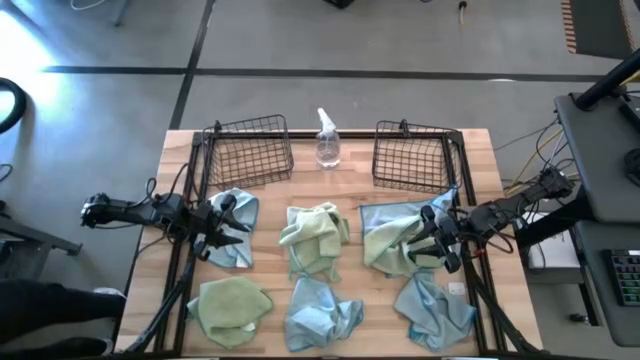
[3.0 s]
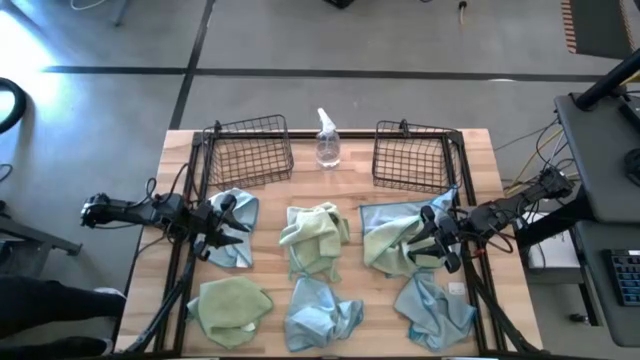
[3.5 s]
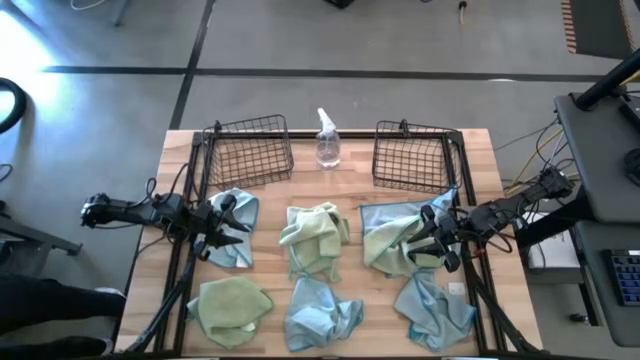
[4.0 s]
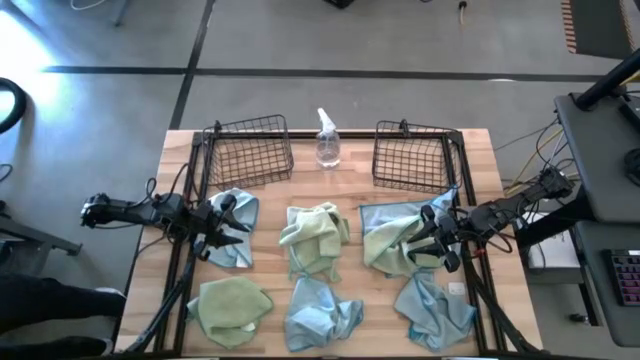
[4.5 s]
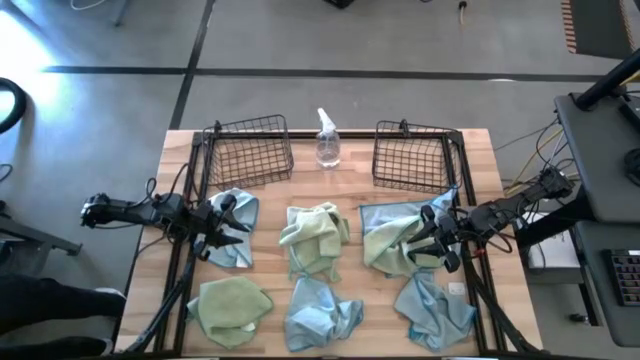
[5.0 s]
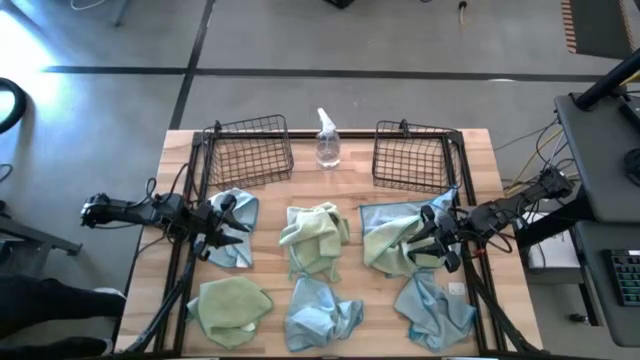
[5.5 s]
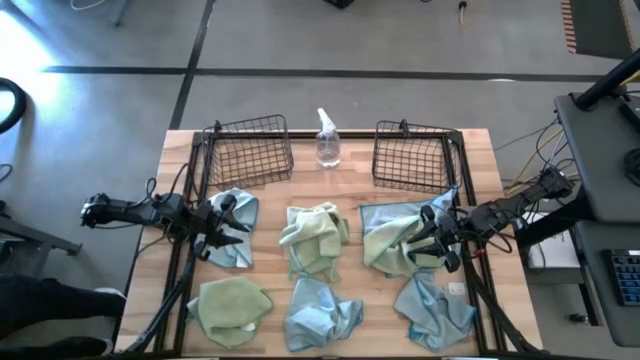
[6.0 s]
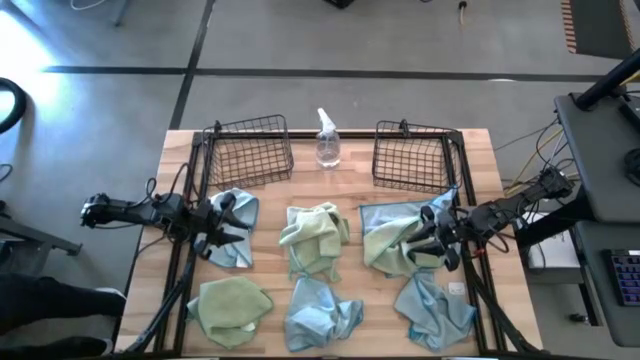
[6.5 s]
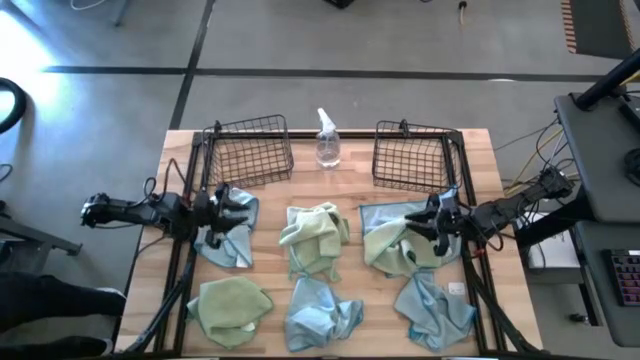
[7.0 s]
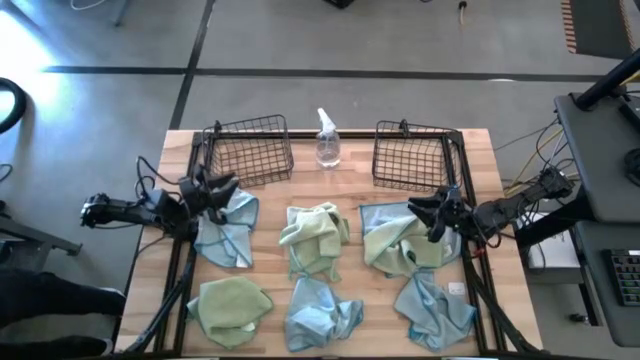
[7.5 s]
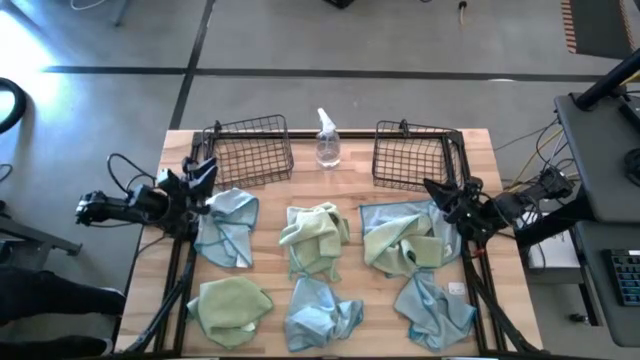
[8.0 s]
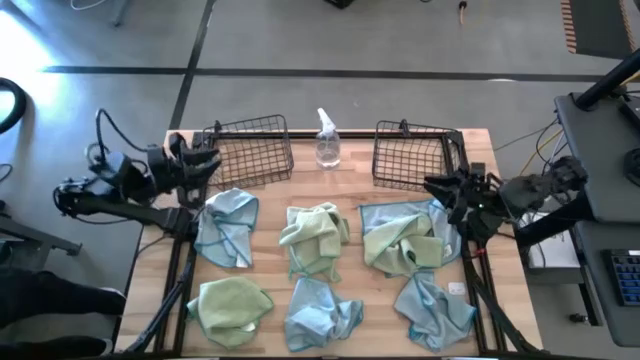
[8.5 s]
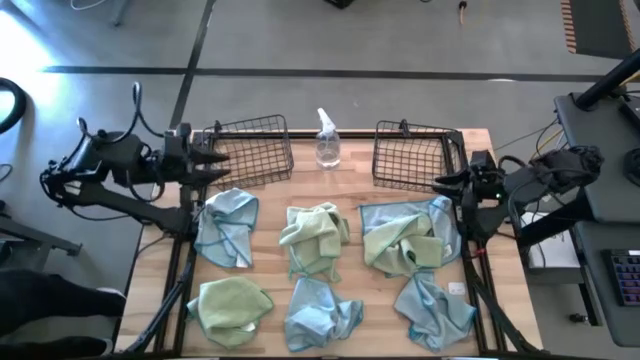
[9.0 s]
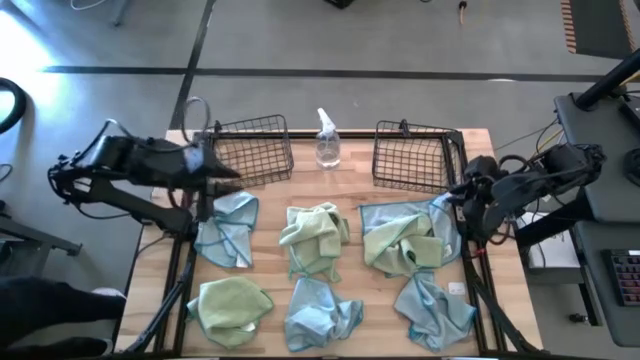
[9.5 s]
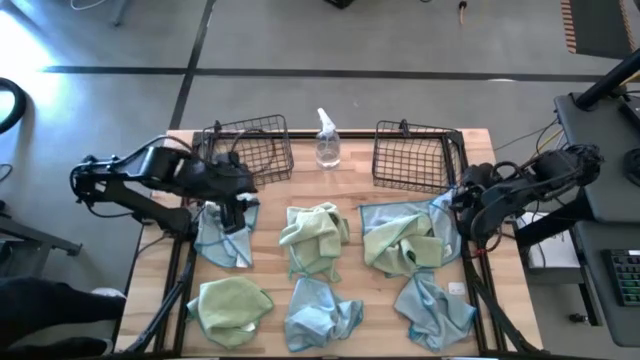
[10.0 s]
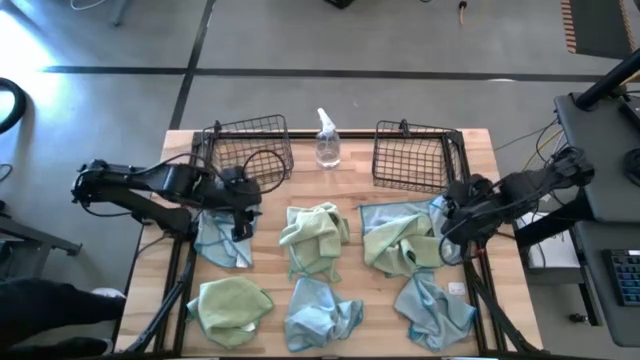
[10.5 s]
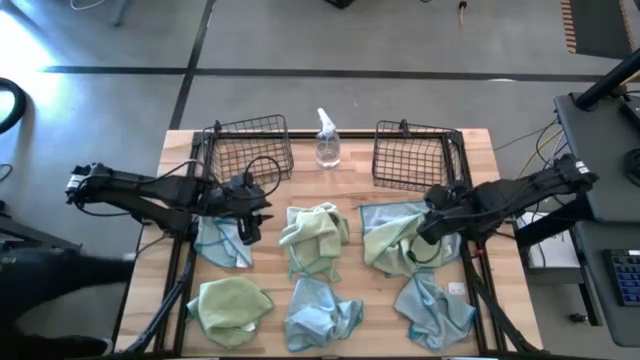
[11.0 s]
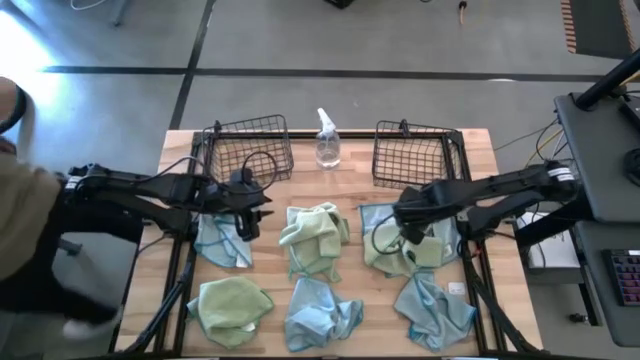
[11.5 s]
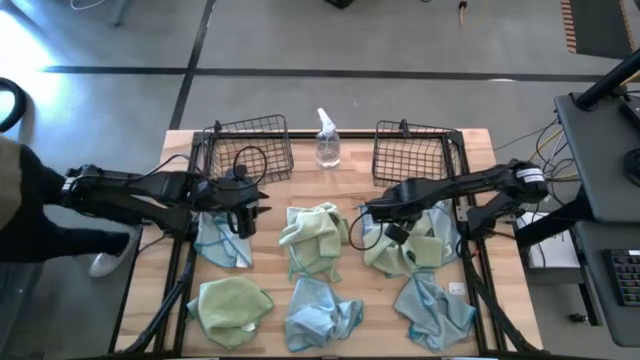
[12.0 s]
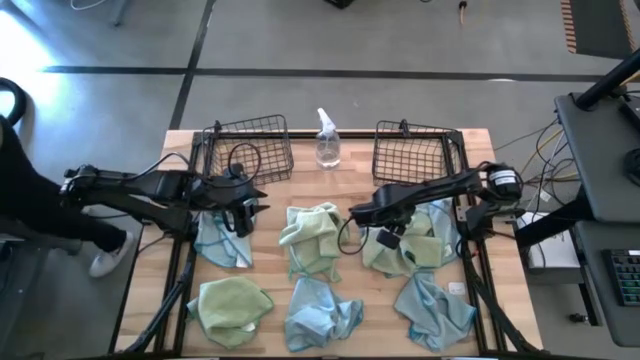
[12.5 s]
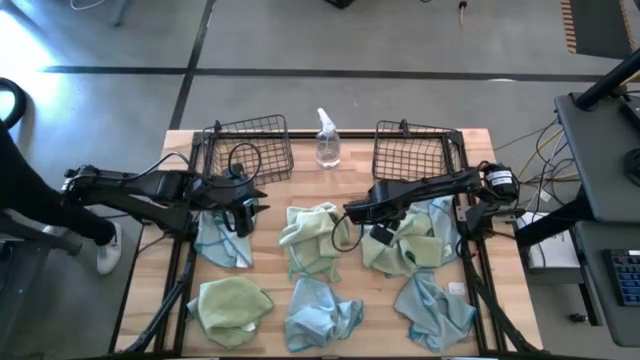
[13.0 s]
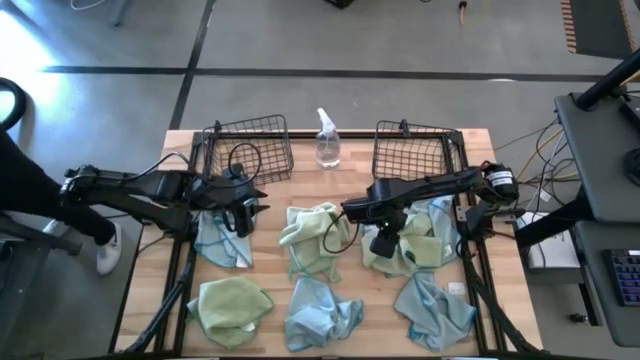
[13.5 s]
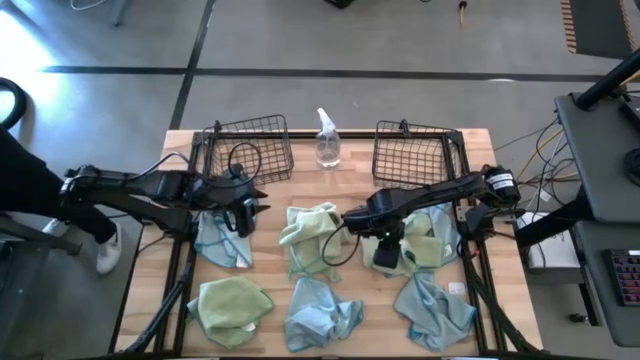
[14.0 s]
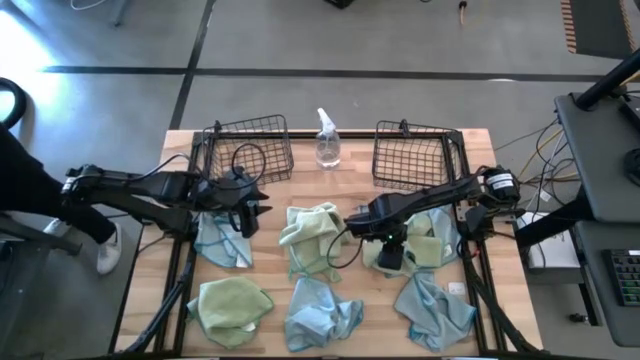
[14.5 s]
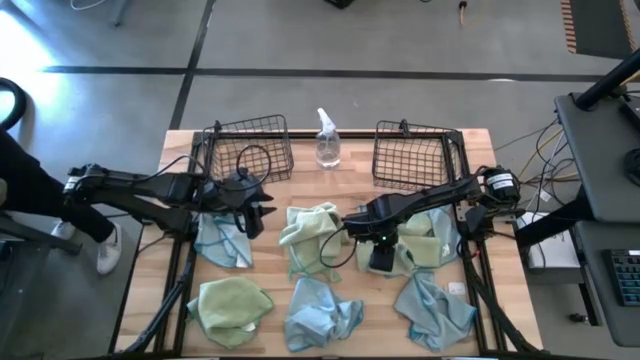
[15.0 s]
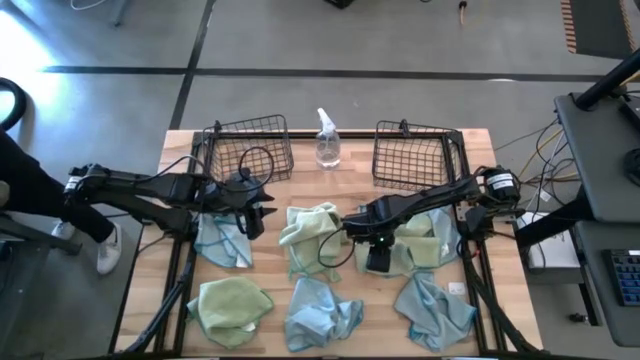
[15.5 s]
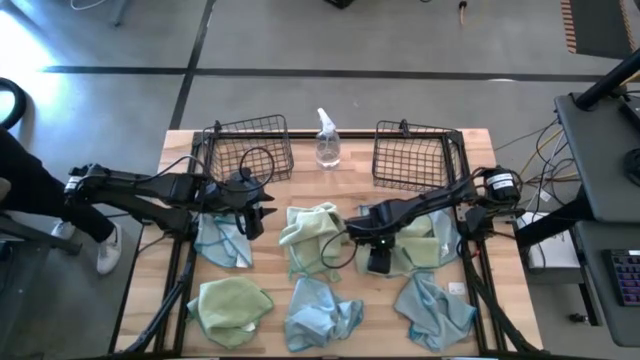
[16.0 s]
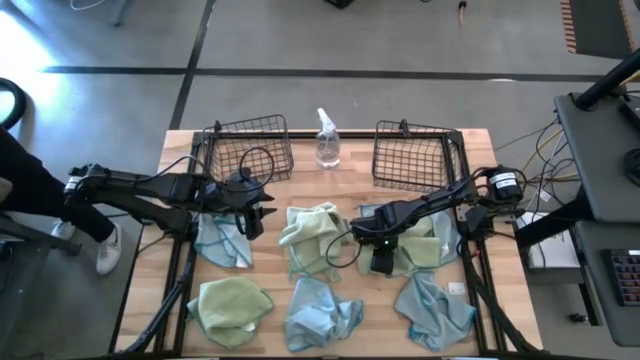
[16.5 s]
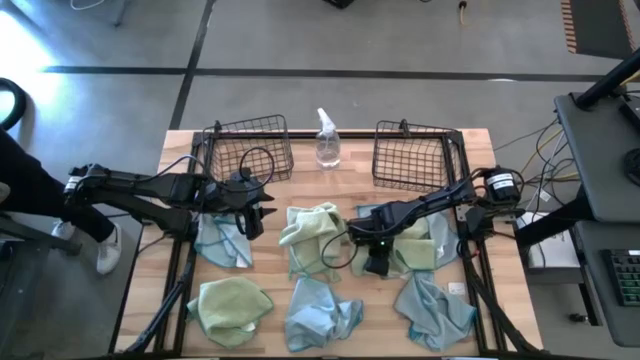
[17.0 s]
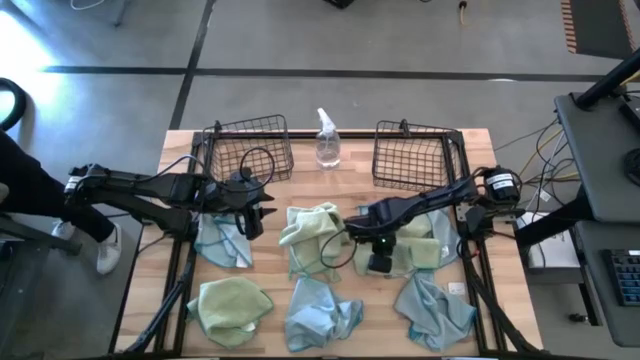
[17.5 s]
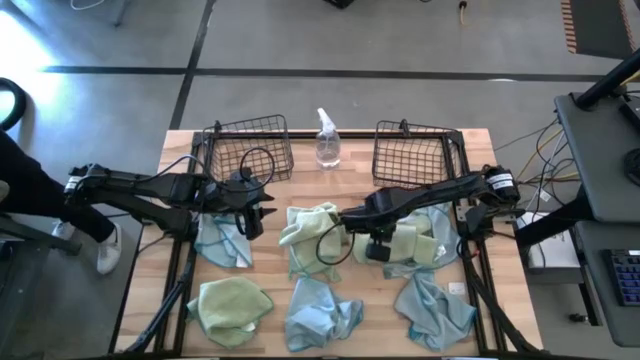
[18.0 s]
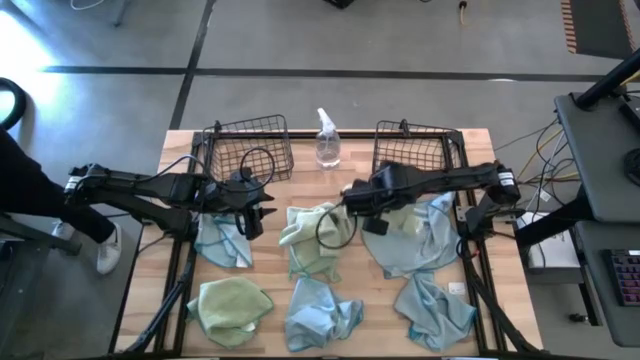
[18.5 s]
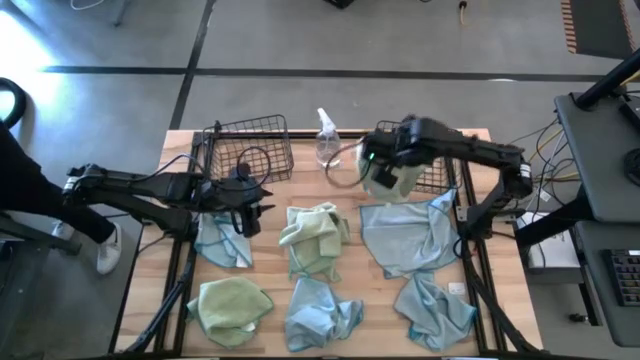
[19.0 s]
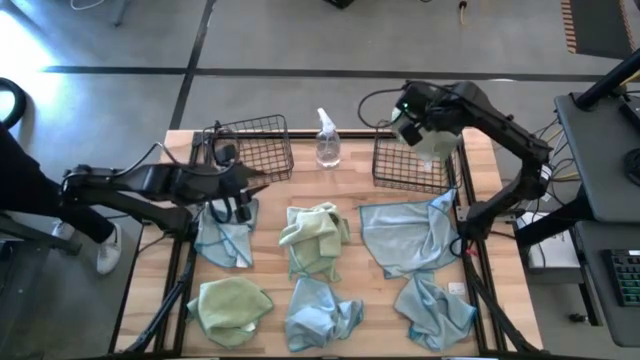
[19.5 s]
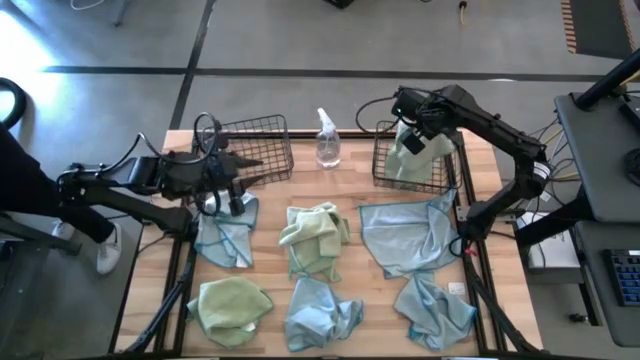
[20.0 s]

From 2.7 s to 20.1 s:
Task: Sort microfiber towel by color & place in baskets
Put the green microfiber cloth into the right wire basket
